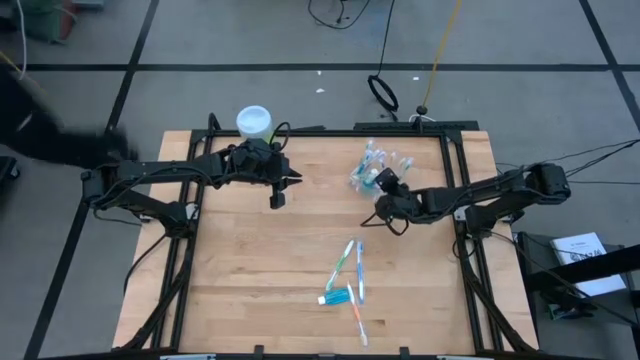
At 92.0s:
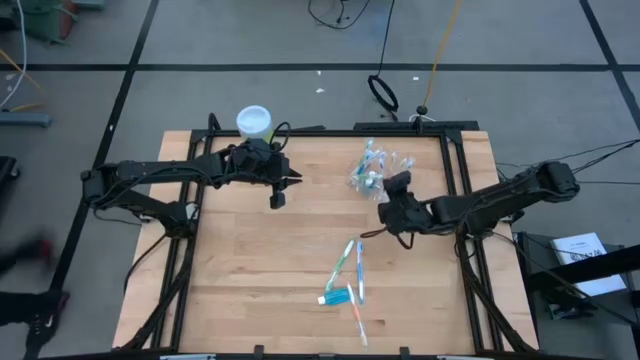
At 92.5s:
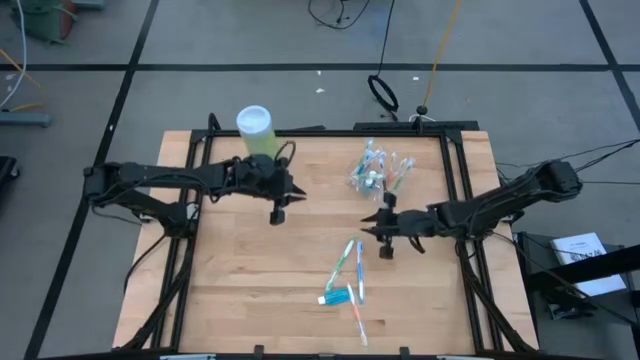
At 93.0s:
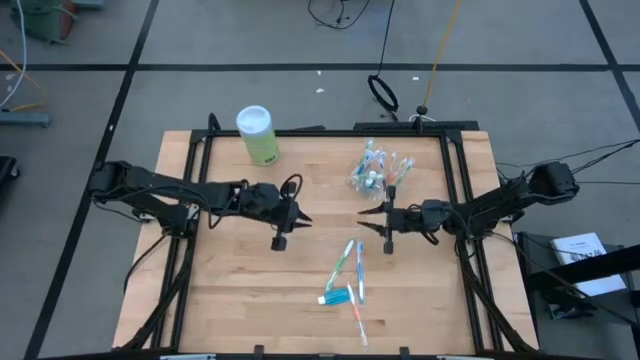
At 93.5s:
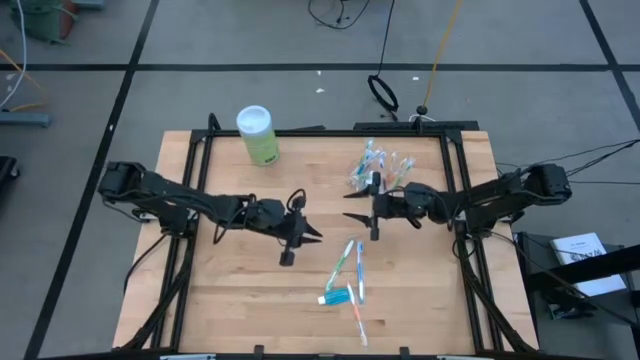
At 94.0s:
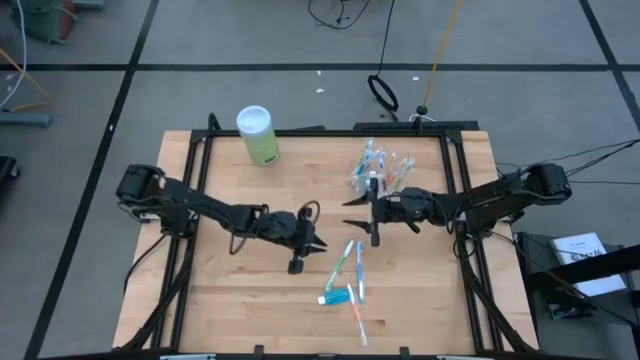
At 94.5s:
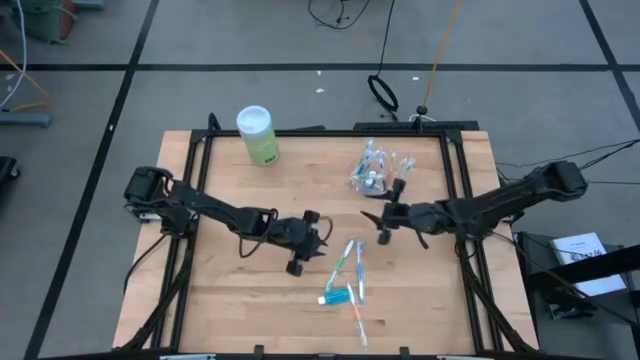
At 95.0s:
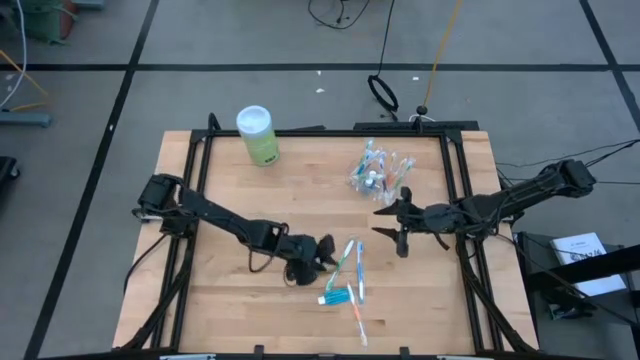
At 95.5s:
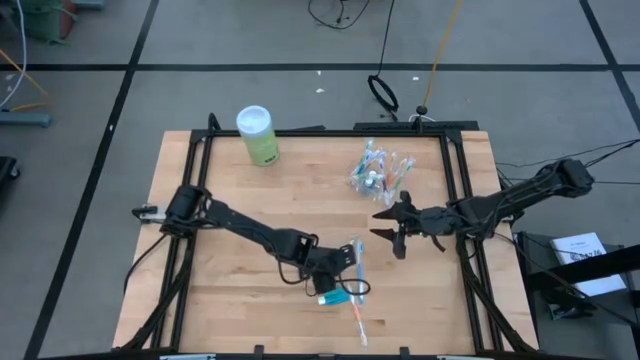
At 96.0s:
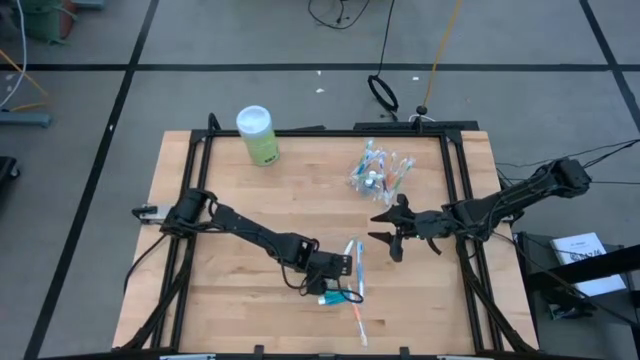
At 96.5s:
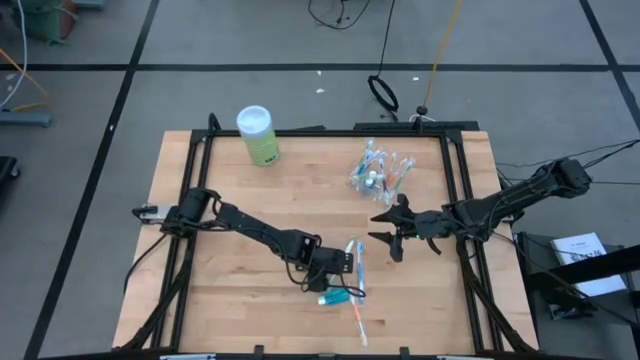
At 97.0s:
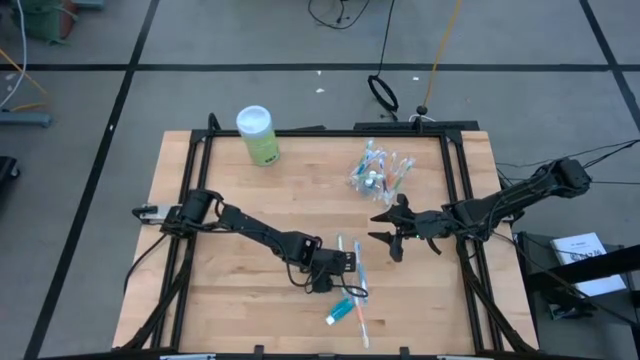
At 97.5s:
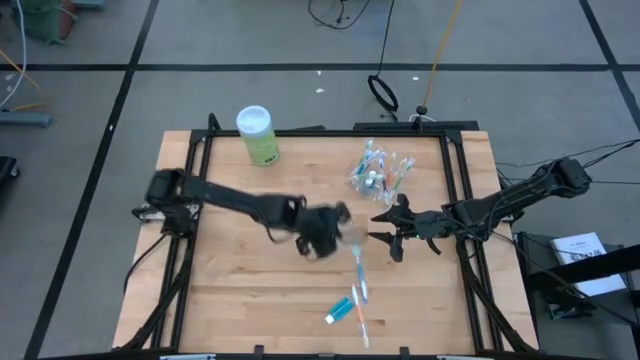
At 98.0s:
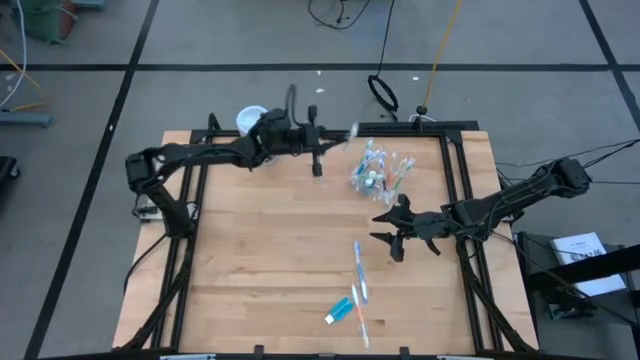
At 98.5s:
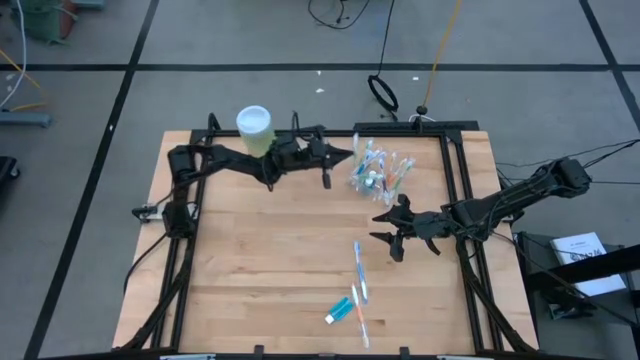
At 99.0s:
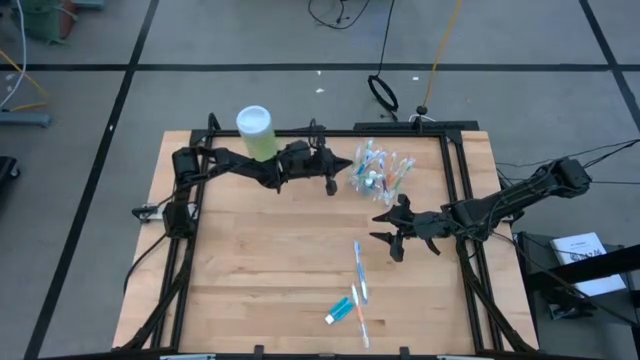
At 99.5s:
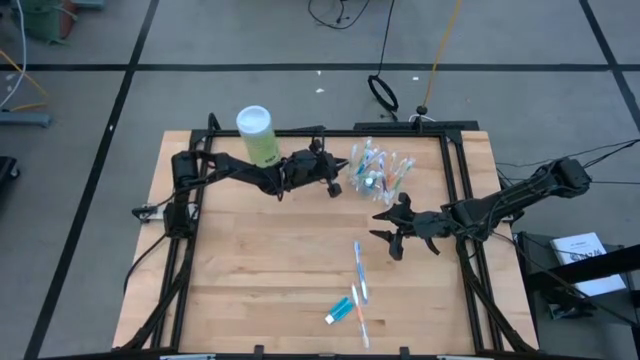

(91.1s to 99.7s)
Task: Pick & Place toothbrushing station
Put the green toothbrush into the transparent organizer

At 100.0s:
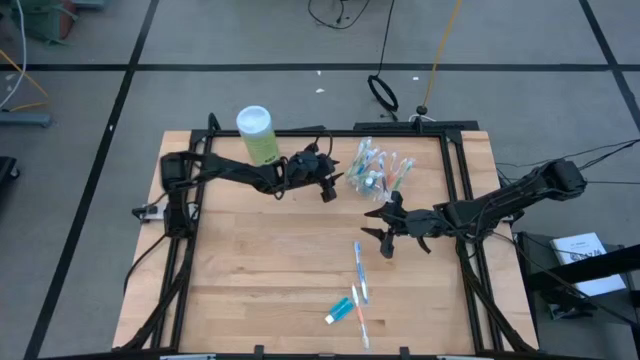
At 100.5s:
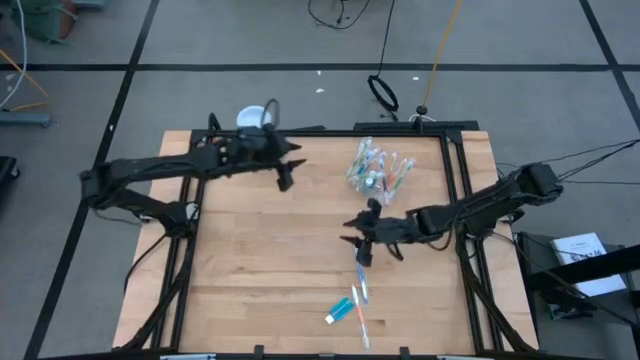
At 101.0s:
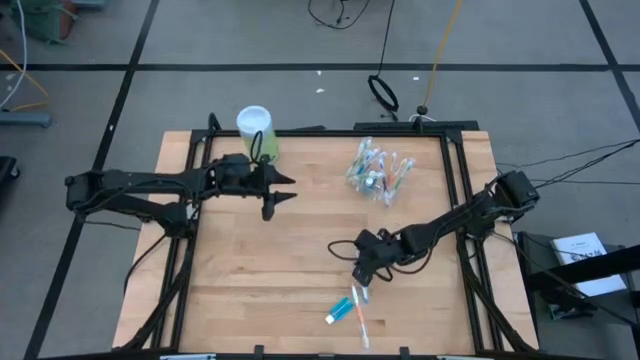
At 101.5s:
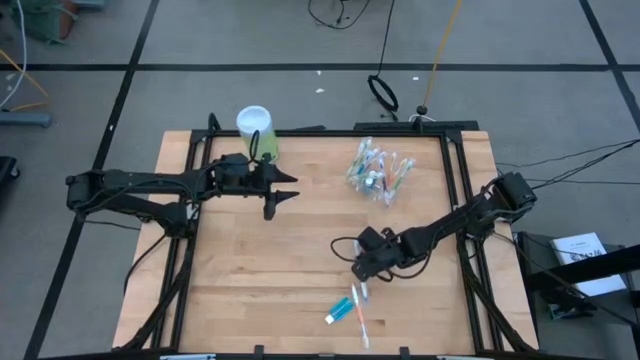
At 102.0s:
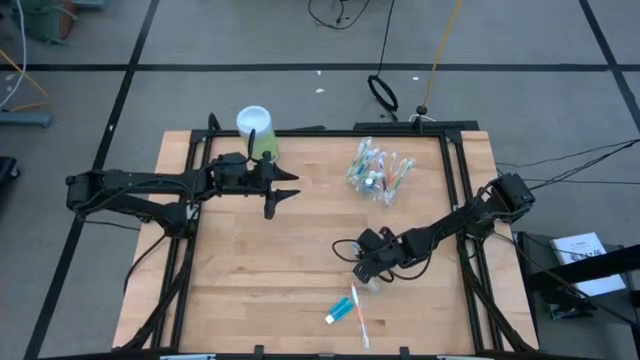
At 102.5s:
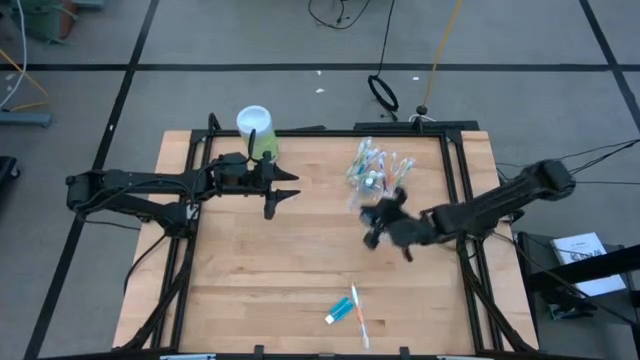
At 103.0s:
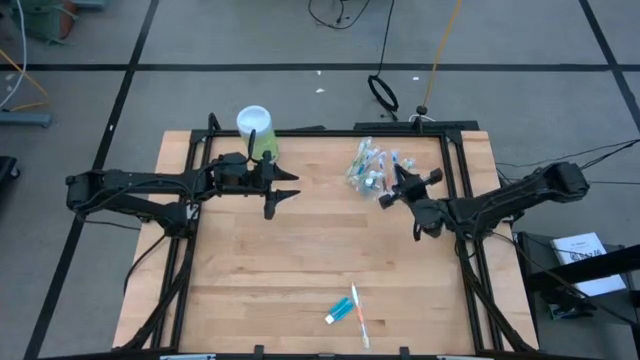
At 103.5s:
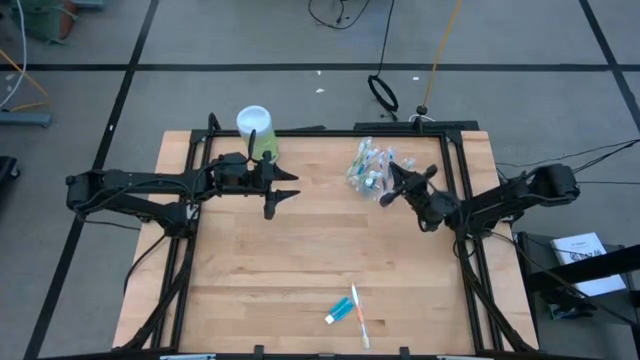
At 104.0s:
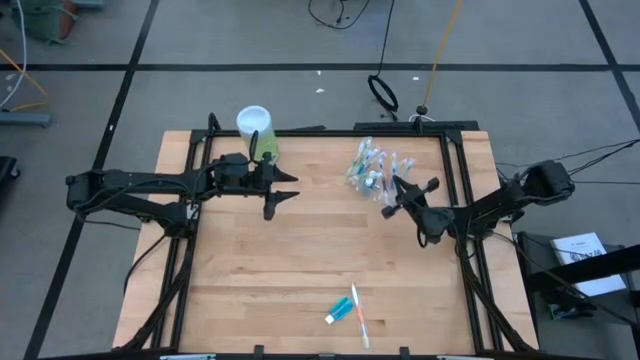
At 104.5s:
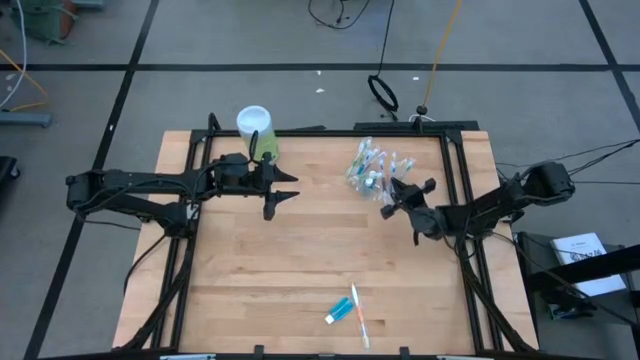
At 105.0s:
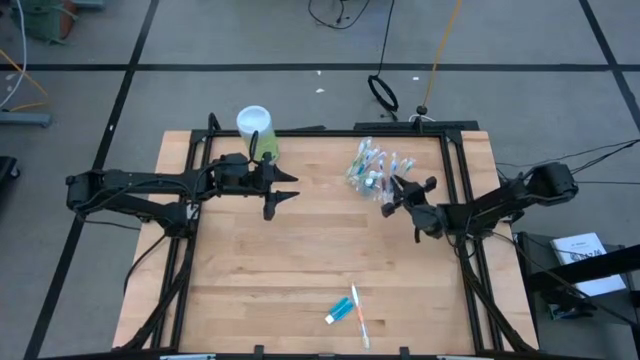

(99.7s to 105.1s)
Put the blue toothbrush into the transparent organizer

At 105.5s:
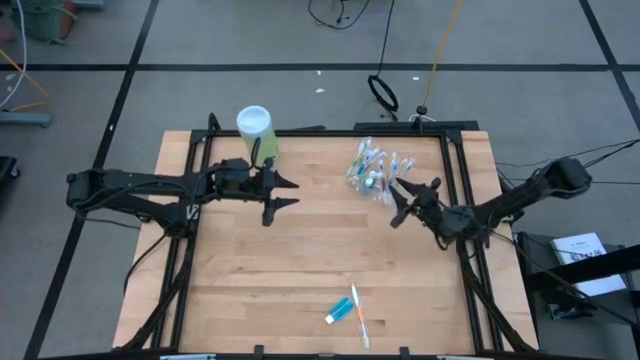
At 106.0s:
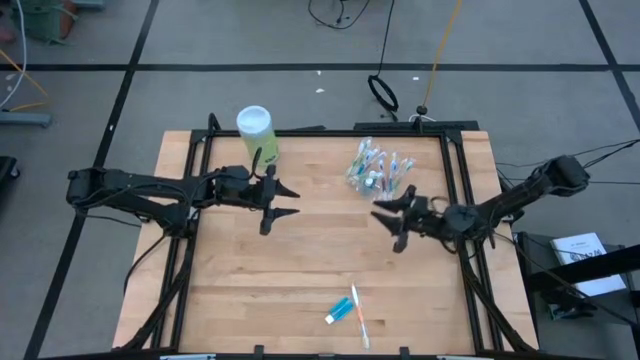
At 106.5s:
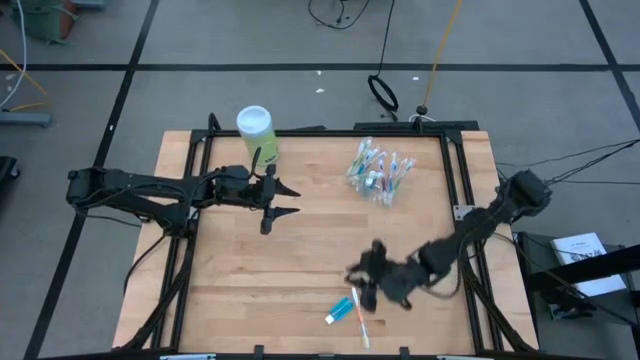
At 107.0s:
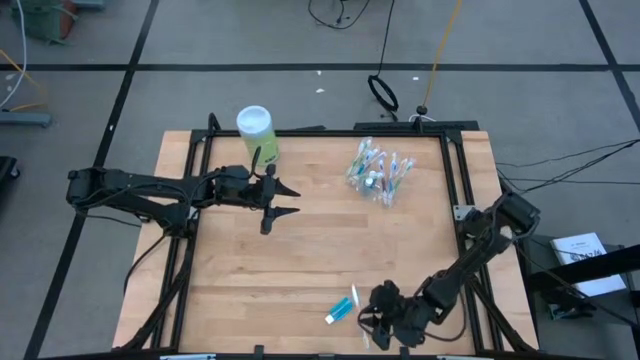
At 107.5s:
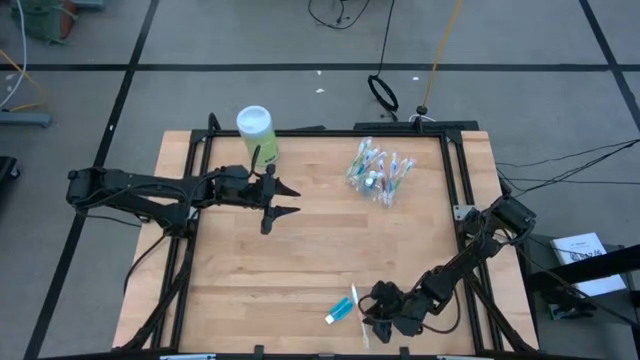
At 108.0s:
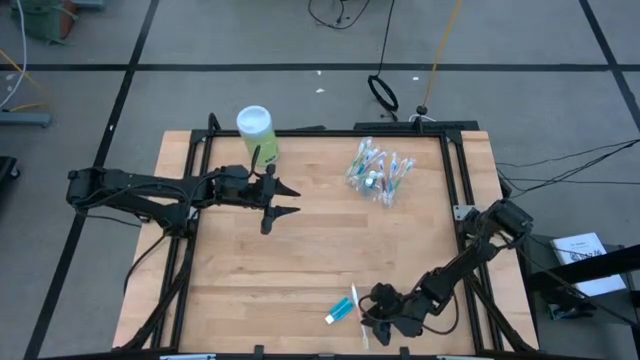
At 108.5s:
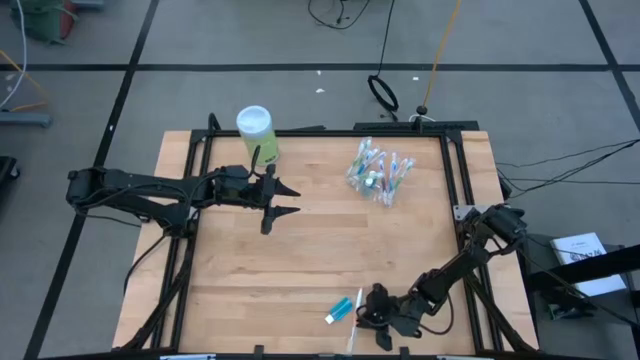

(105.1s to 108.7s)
Put the orange toothbrush into the transparent organizer

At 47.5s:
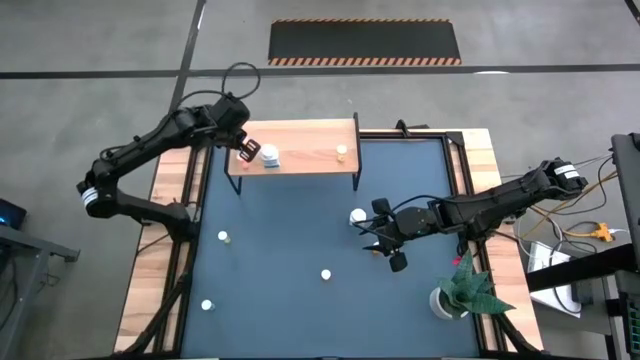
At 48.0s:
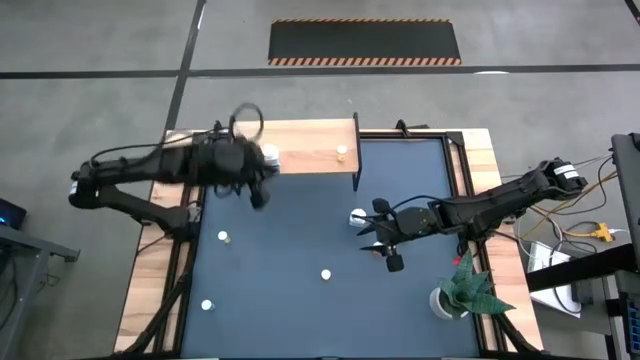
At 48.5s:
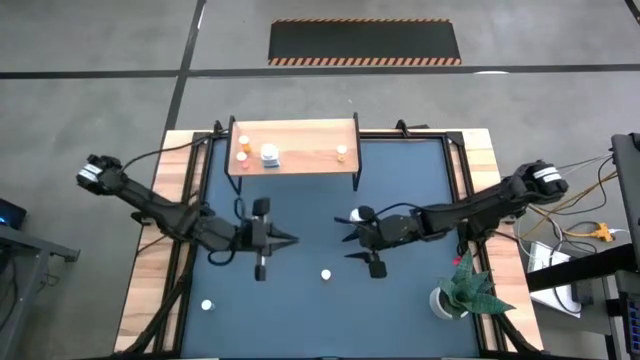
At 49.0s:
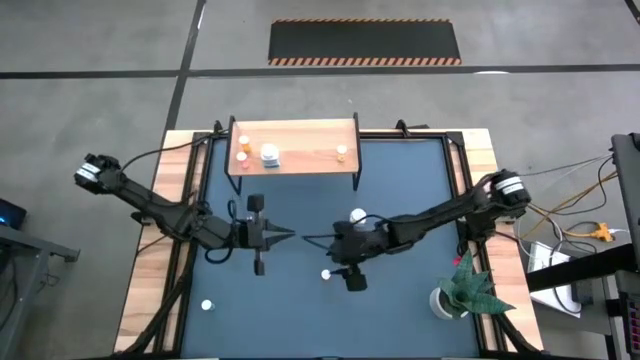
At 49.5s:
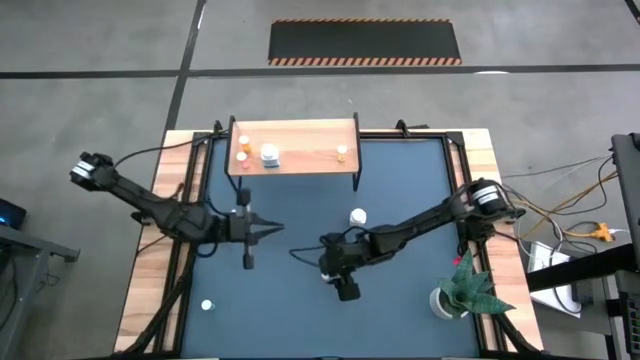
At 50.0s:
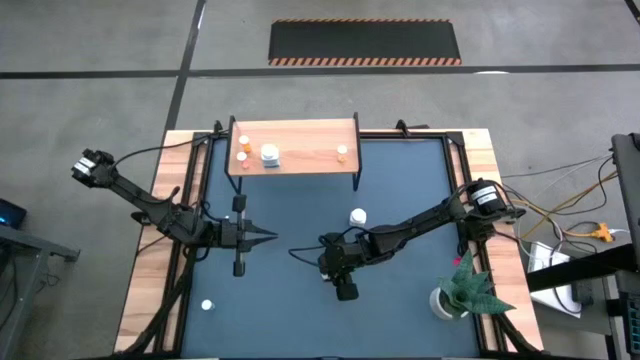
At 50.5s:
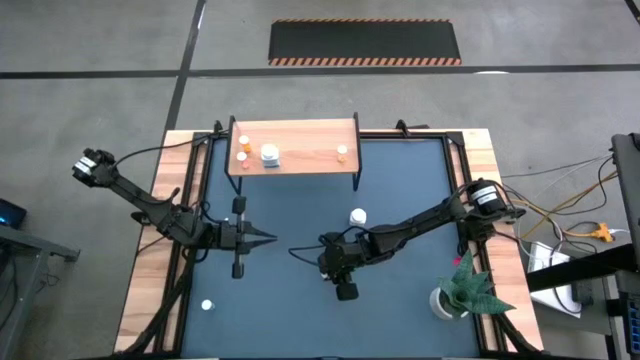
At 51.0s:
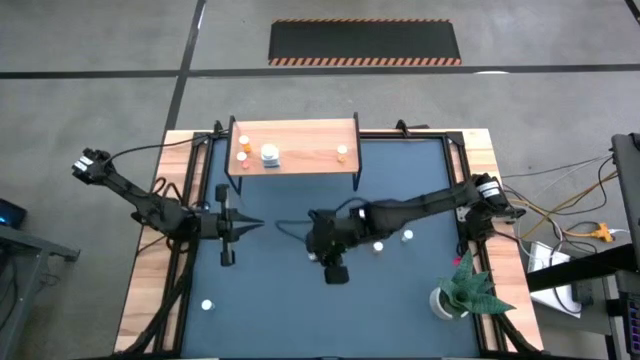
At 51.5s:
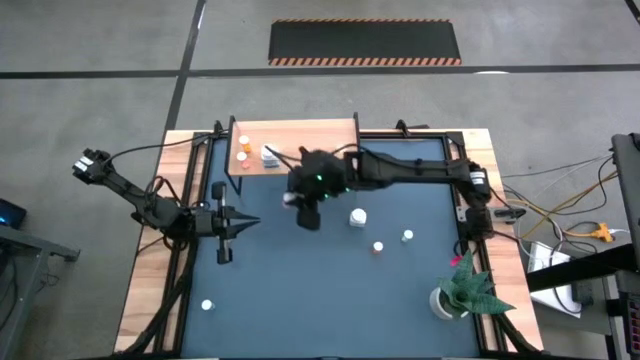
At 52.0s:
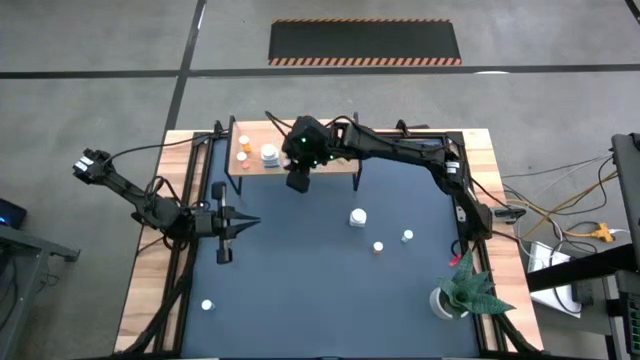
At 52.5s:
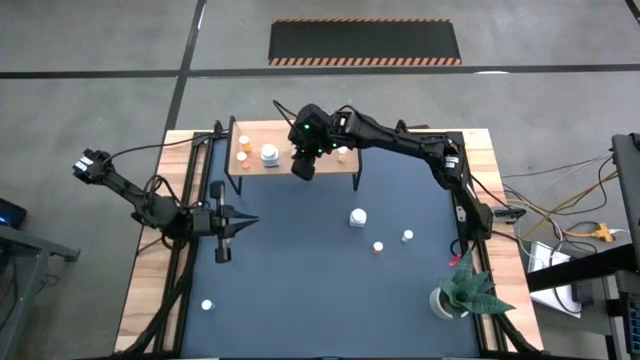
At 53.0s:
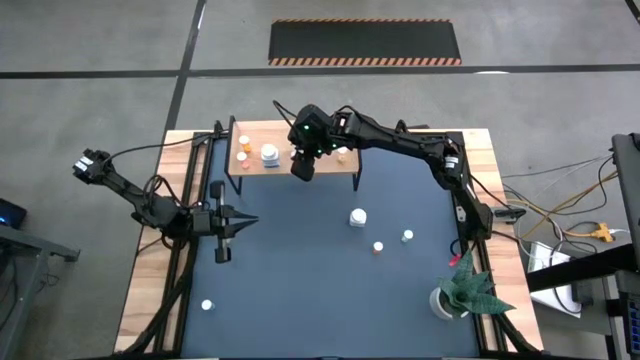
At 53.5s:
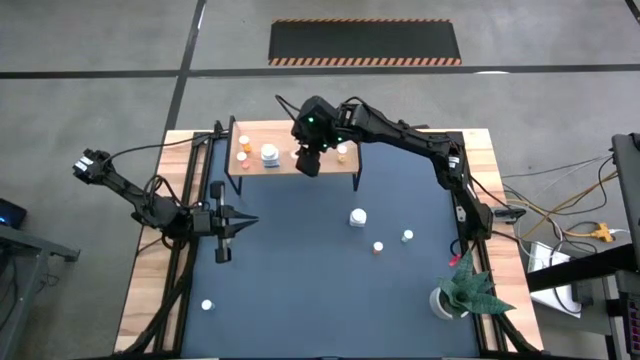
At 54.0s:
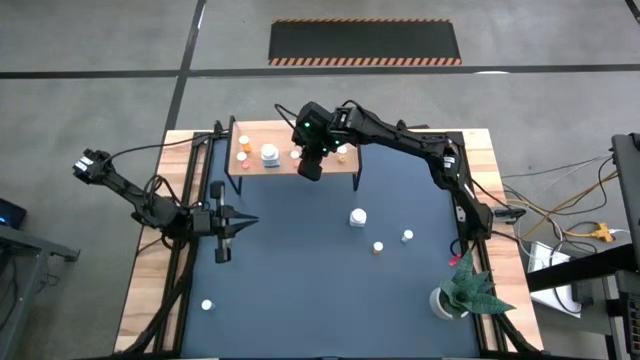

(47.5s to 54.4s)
Task: Pick and place medicine bottles onto shelf by color
Put the pink pill bottle on the shelf
